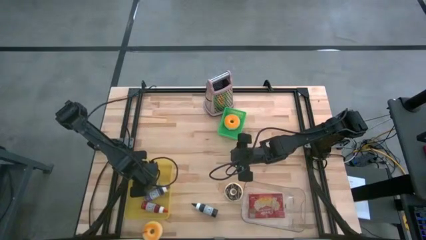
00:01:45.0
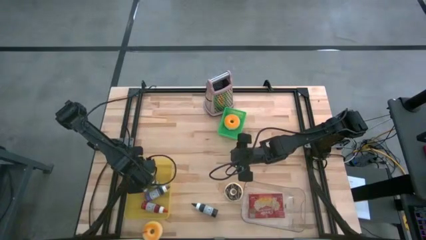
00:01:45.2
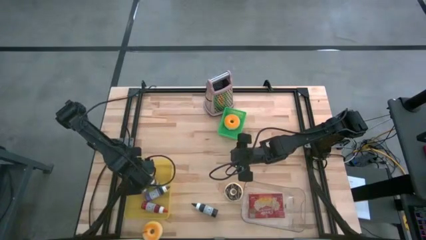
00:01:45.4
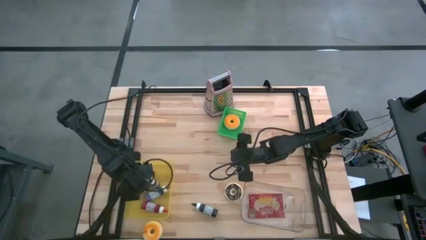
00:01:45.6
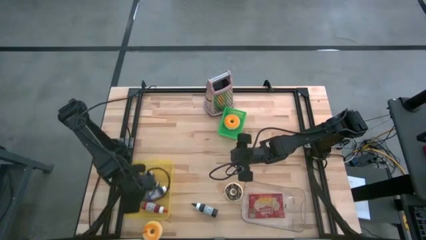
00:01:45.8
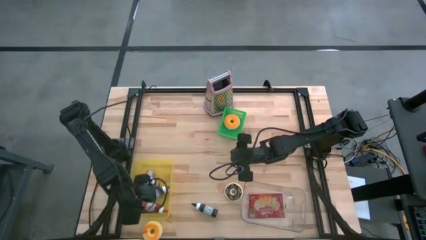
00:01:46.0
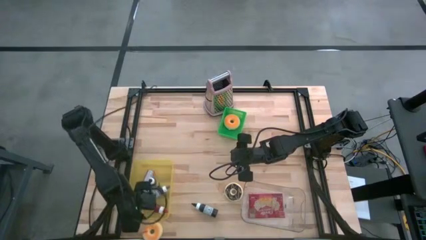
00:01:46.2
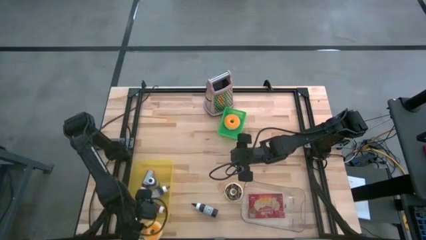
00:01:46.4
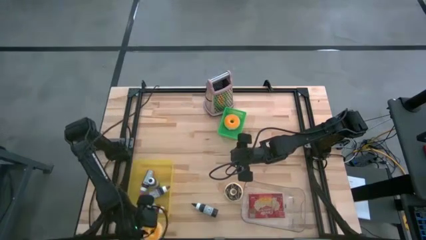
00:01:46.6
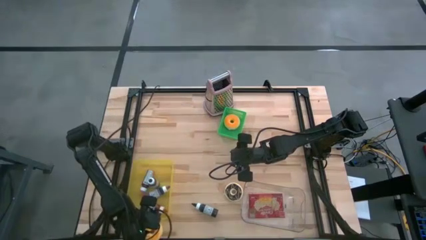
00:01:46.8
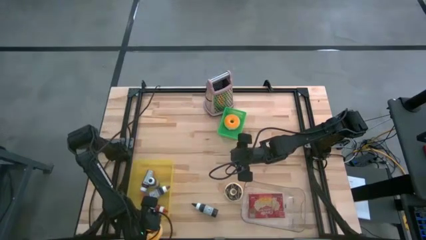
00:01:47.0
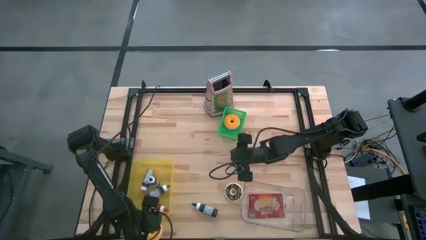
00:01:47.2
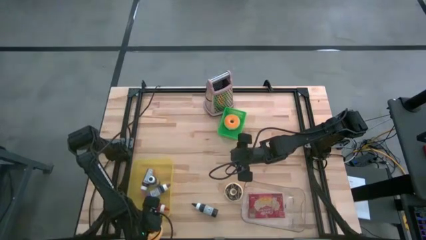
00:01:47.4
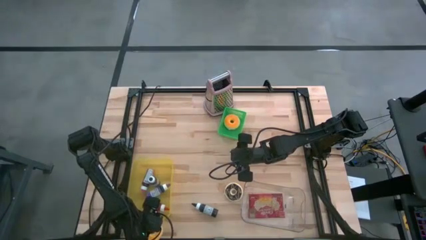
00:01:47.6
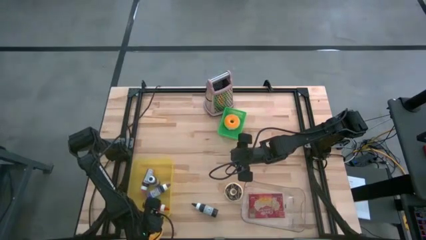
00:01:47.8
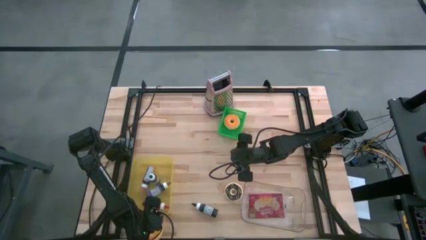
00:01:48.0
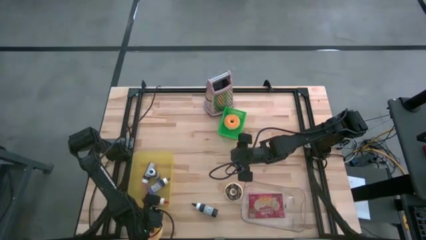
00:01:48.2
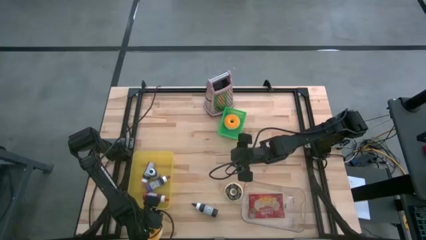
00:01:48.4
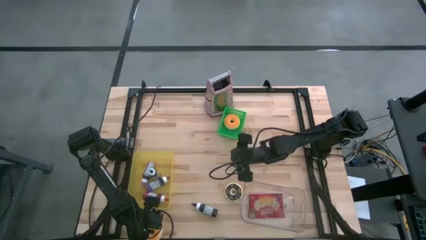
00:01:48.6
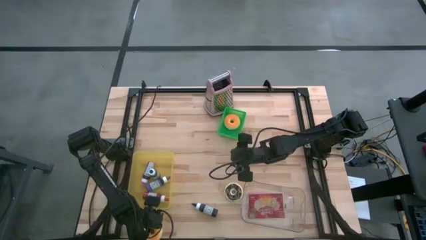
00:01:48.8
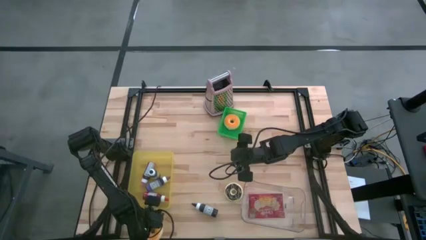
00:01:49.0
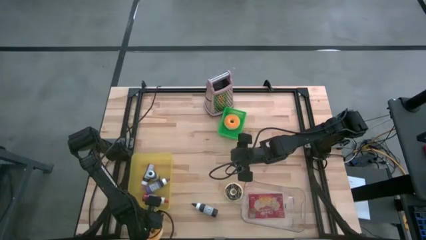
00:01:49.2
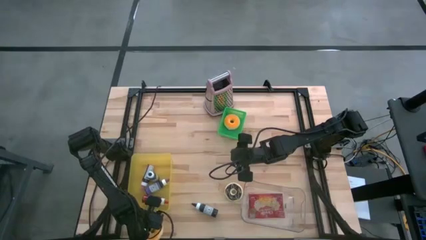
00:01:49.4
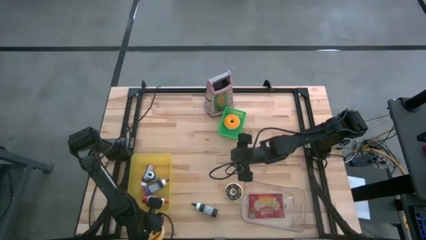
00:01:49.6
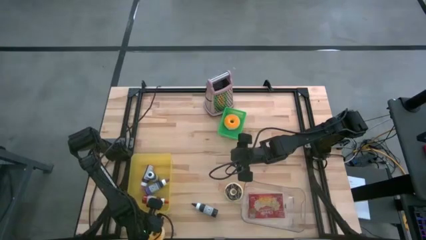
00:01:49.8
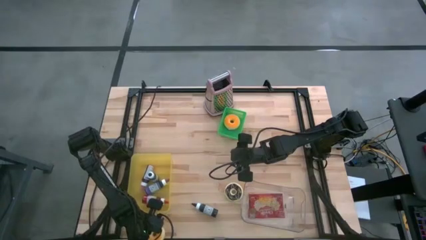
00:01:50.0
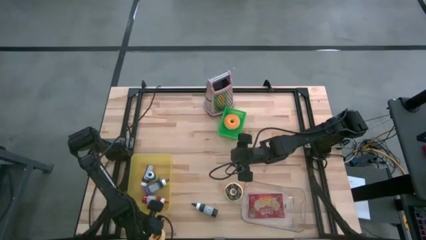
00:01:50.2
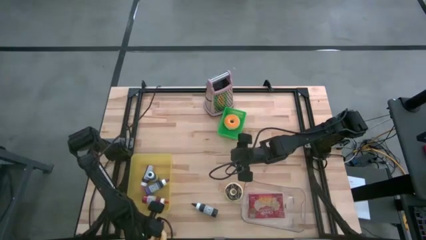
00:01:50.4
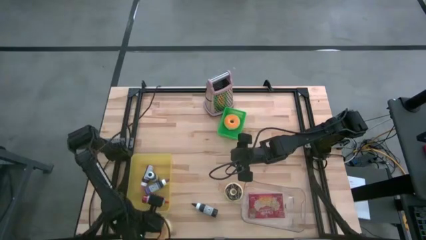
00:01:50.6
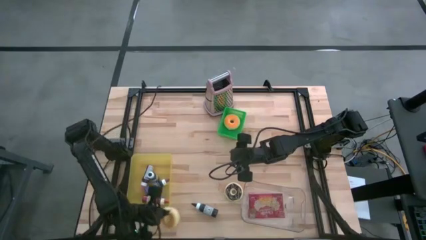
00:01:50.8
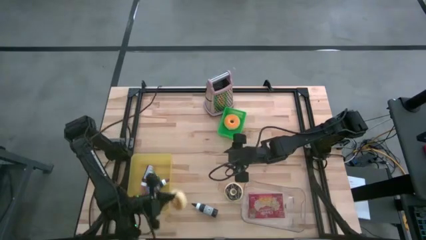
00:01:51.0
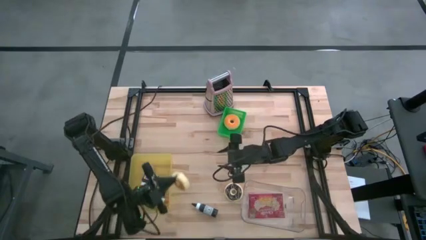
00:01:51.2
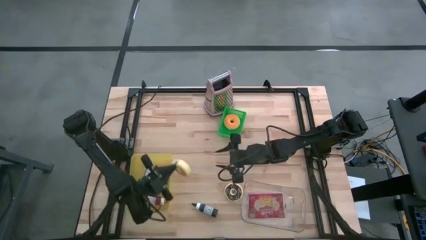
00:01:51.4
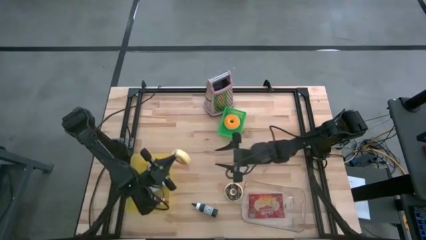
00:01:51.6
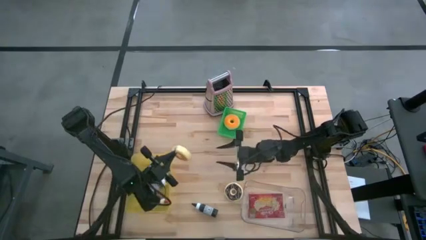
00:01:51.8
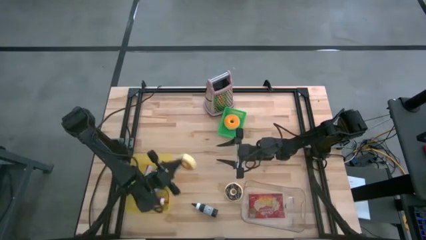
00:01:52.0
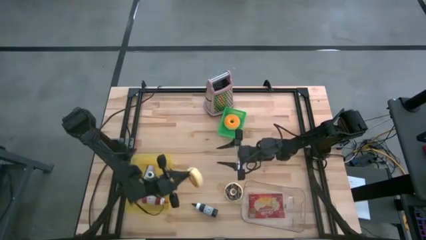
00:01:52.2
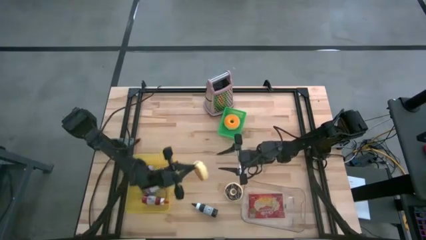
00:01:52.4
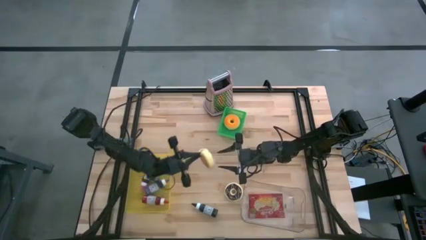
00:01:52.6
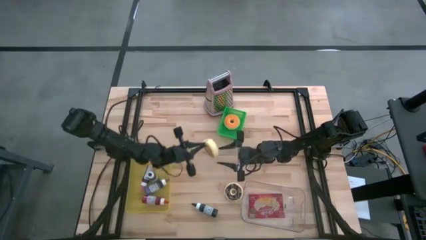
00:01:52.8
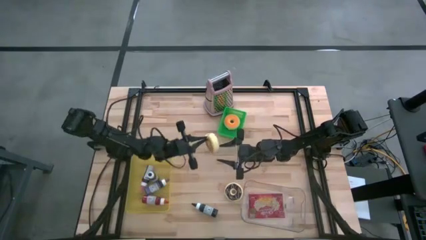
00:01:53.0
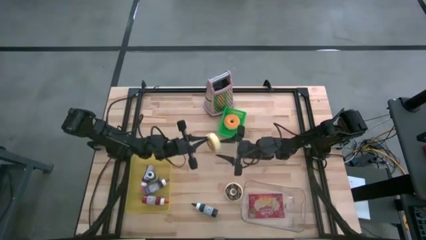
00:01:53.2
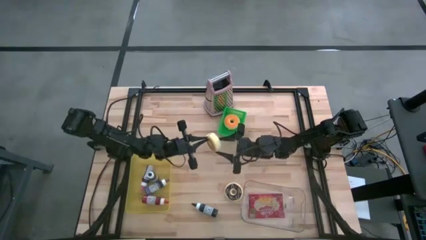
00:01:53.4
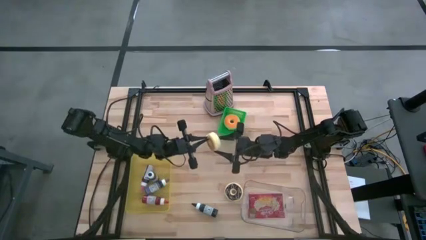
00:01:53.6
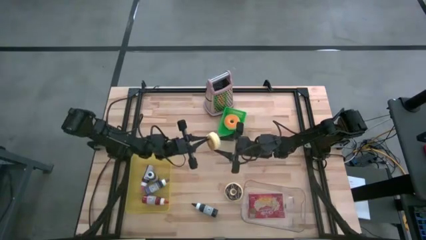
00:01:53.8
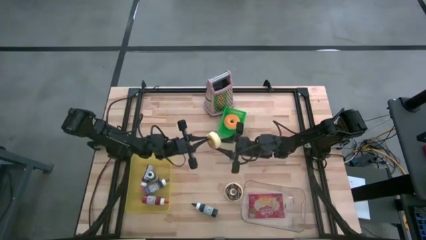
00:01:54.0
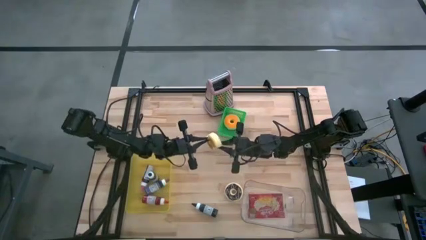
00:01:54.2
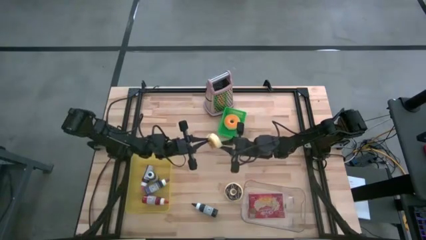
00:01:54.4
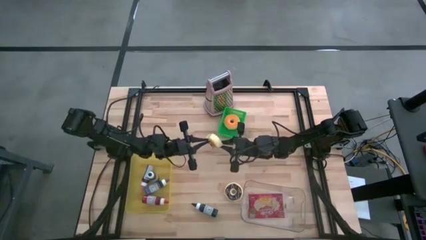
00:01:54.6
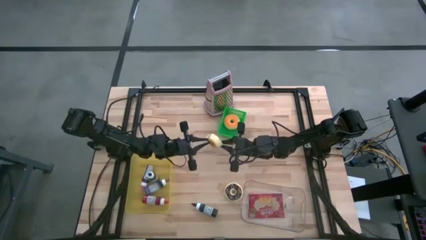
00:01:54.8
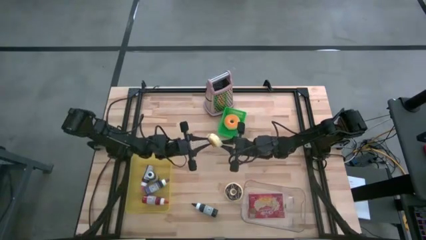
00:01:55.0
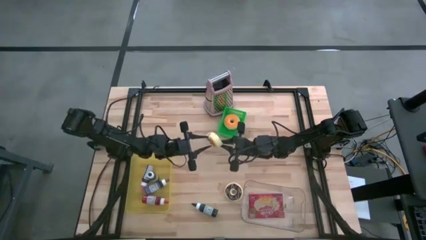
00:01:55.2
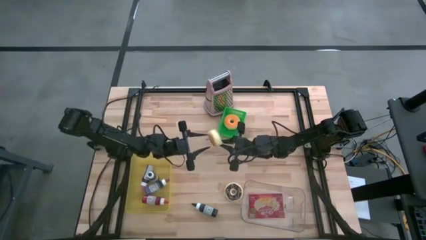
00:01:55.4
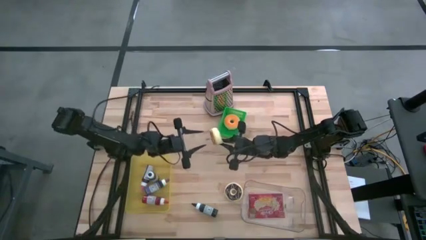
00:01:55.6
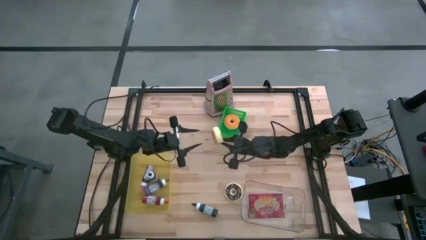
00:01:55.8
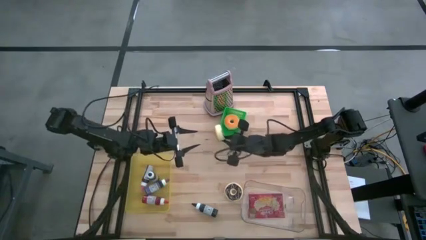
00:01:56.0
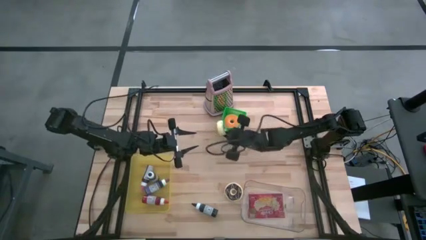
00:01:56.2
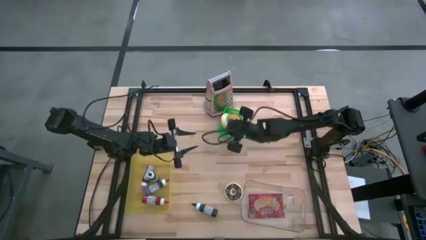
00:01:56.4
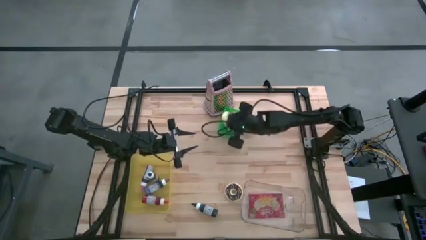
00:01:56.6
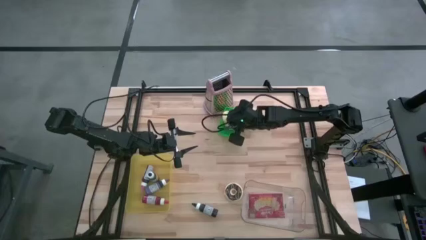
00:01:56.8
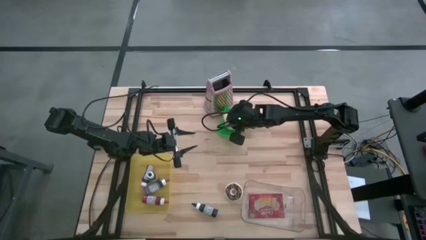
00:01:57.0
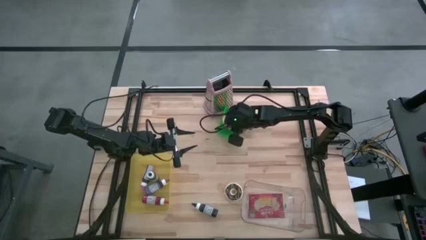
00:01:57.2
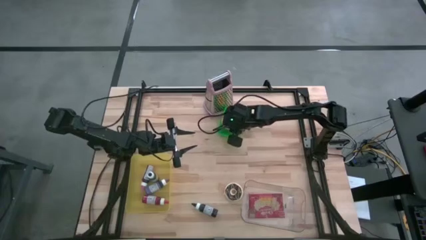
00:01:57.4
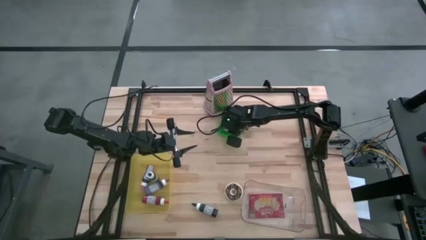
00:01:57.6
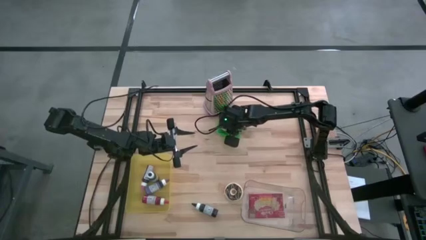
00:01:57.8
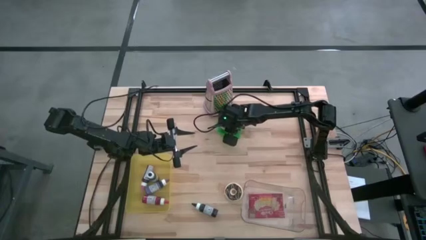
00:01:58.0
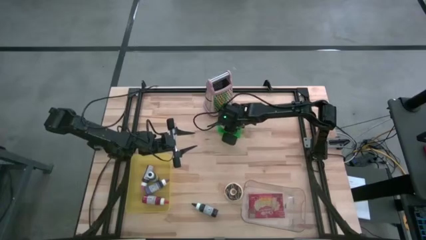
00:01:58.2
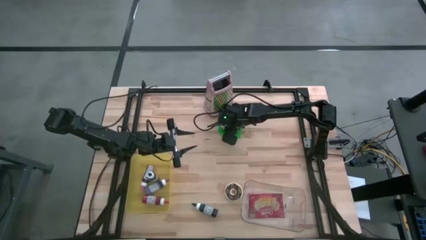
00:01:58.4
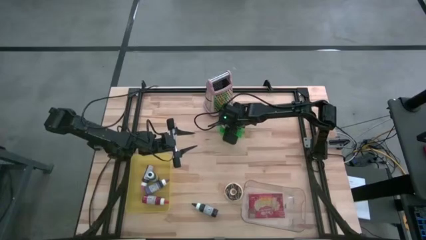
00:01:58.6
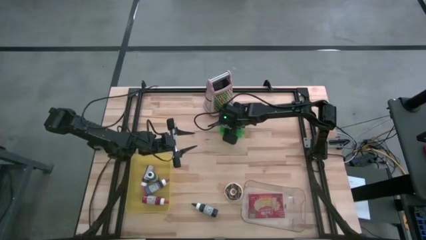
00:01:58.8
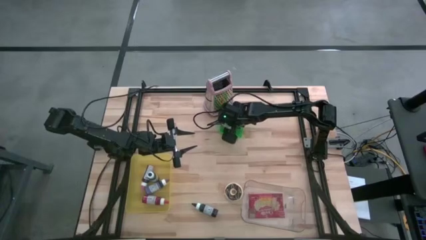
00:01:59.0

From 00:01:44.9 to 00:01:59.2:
Task: Pick & Place Food Item
Put the green donut into the green bin

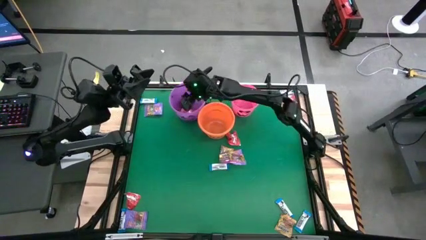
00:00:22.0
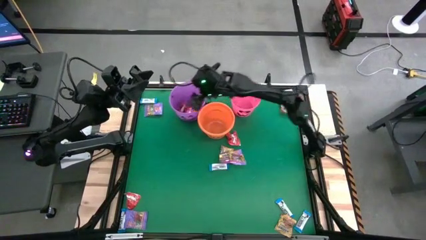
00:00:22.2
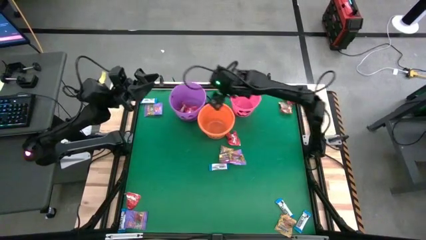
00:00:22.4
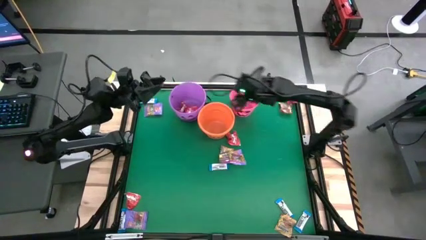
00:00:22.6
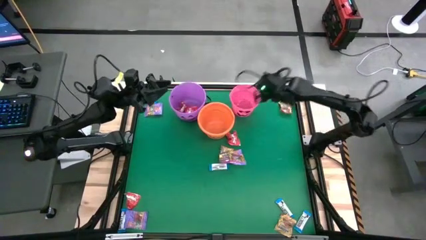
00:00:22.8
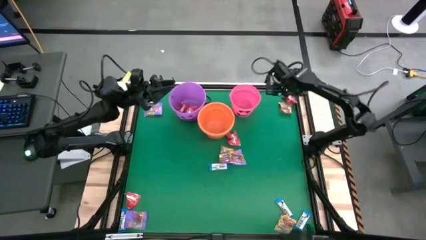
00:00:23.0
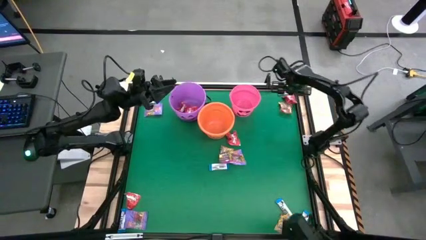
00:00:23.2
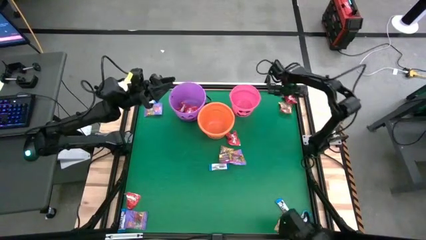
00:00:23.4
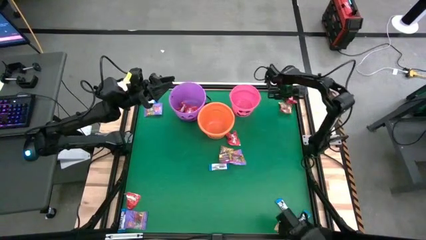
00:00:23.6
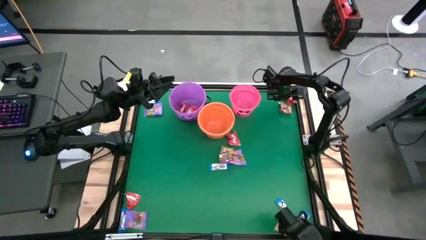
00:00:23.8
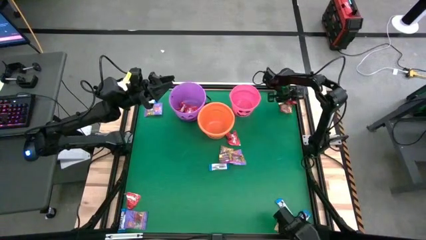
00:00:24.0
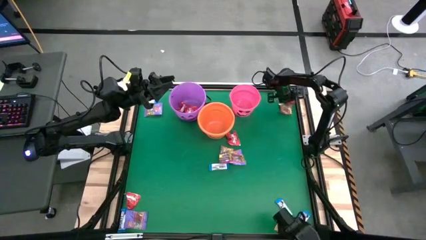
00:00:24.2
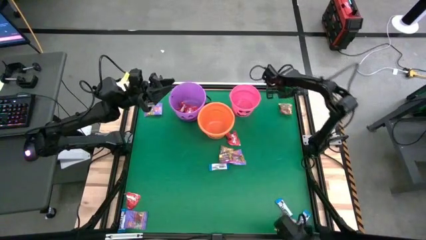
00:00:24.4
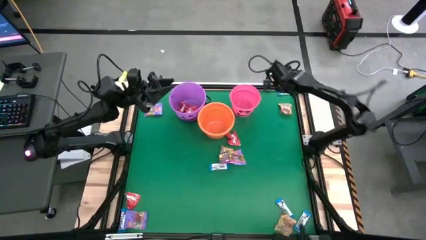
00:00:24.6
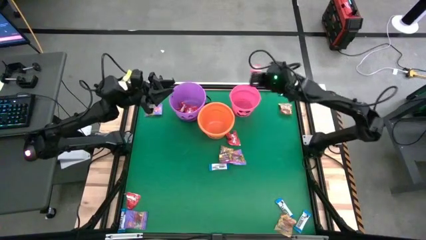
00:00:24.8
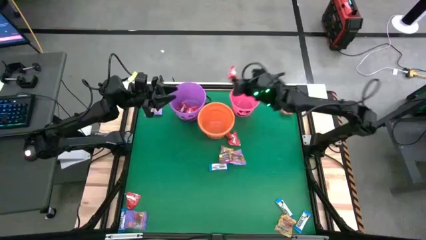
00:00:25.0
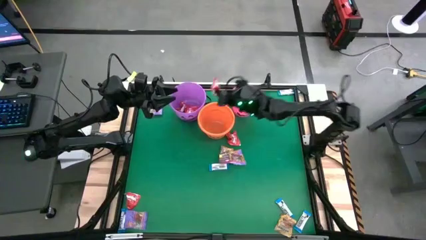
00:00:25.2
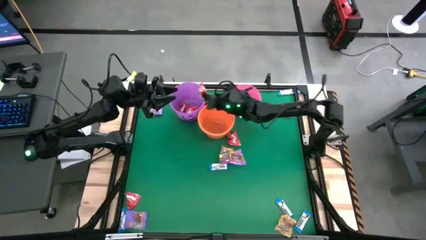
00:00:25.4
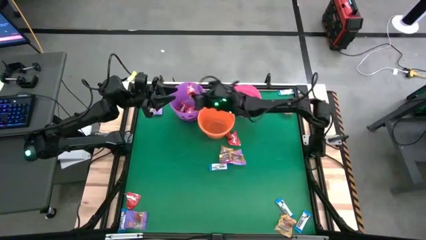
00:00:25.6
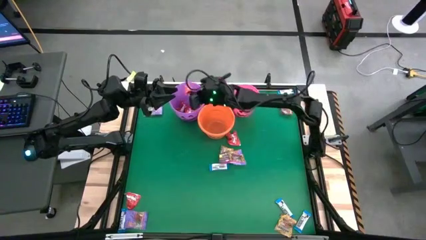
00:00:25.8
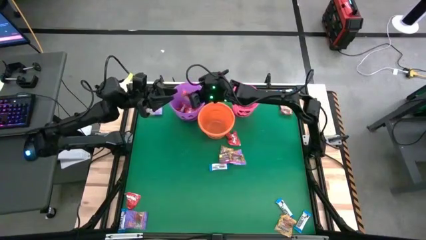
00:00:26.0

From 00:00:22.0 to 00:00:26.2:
Task: Sort candy by brand, put in halloween buckets
Put the red candy into the purple bucket
